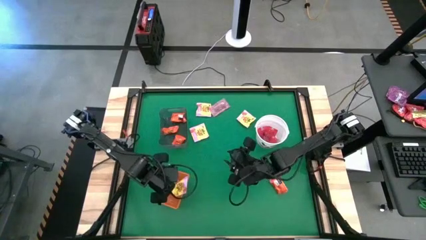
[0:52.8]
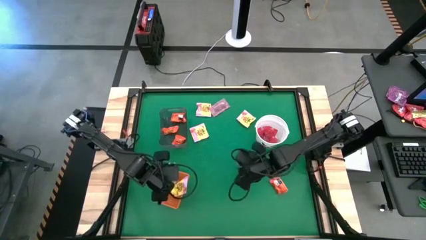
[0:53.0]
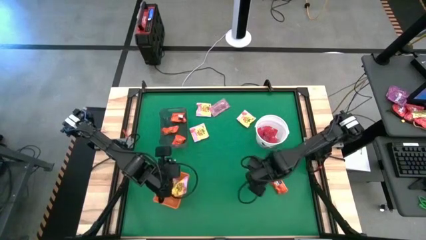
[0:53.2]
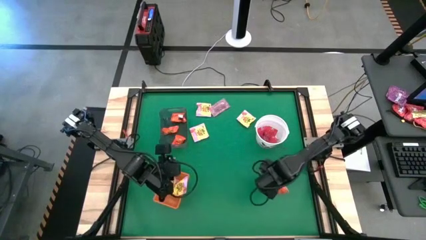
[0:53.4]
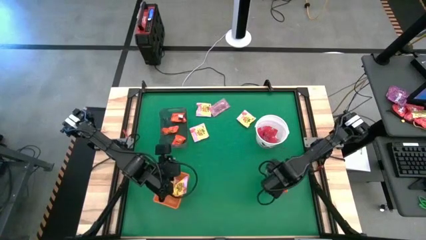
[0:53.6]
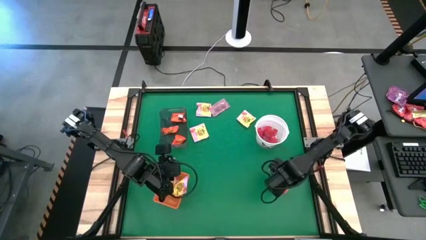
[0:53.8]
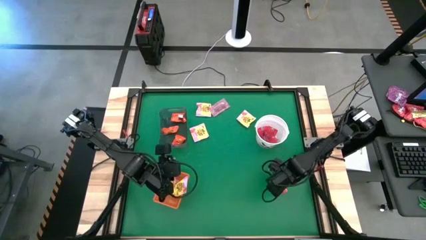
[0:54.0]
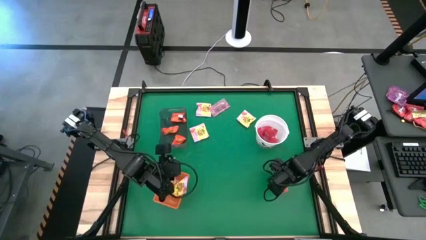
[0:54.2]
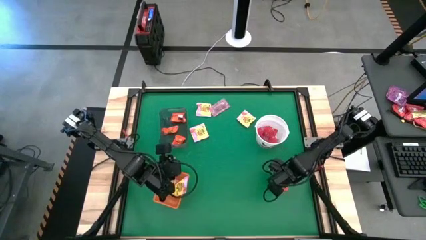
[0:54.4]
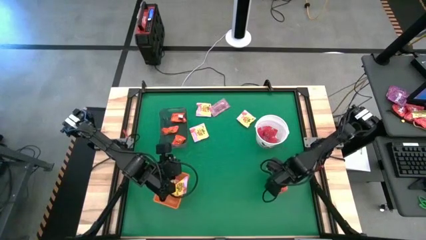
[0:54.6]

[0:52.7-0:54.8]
Task: Sort candy by brand, put in halloween buckets
Put the orange chocolate into the black bin

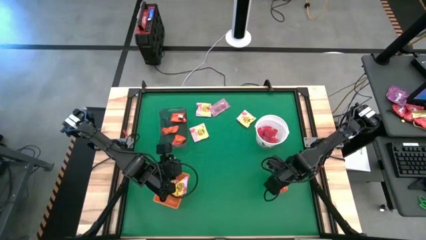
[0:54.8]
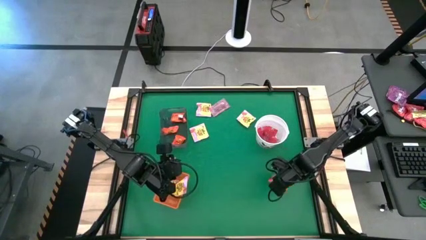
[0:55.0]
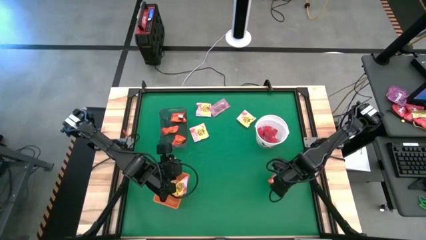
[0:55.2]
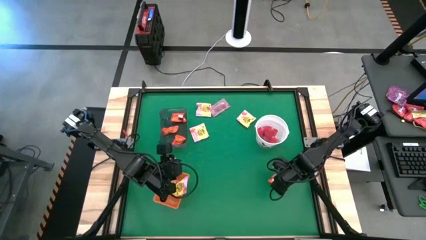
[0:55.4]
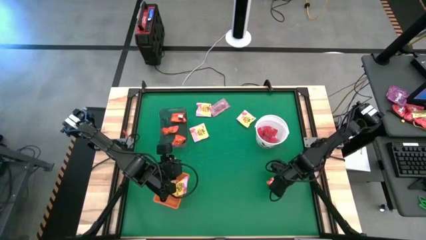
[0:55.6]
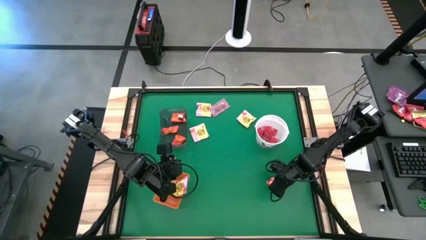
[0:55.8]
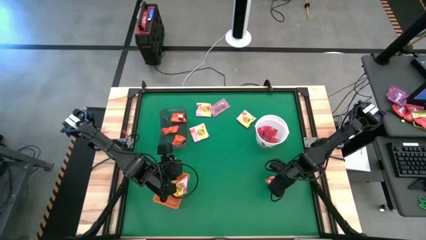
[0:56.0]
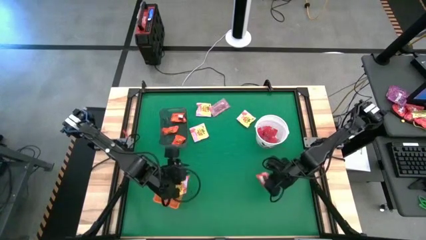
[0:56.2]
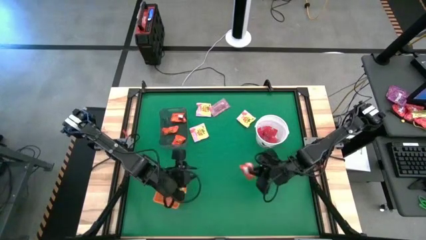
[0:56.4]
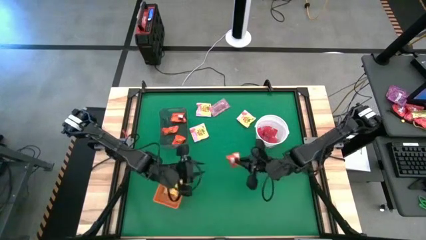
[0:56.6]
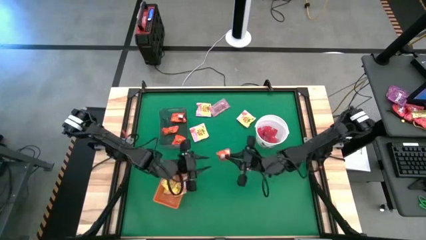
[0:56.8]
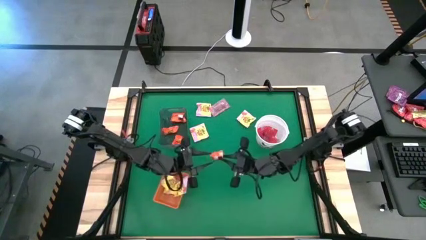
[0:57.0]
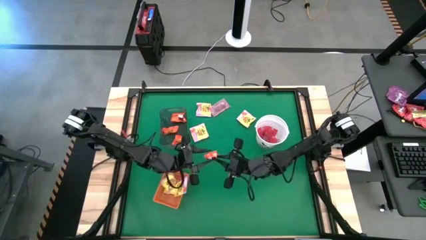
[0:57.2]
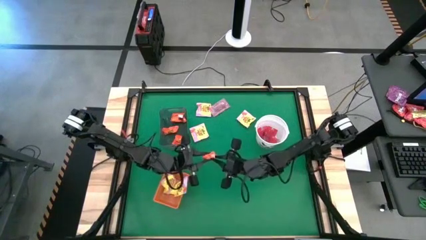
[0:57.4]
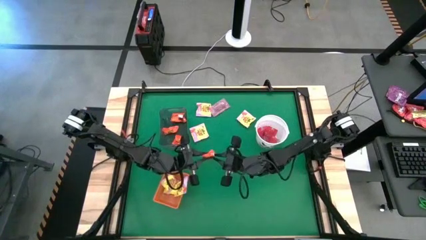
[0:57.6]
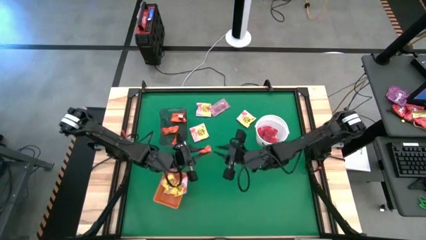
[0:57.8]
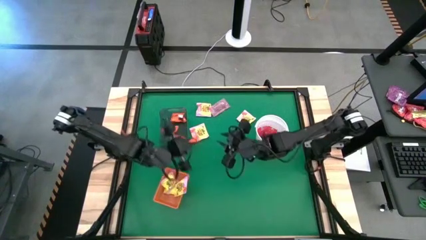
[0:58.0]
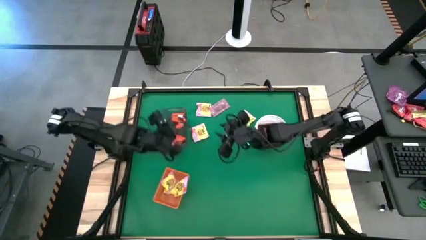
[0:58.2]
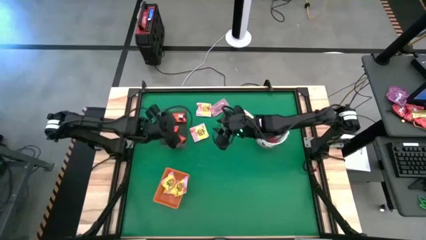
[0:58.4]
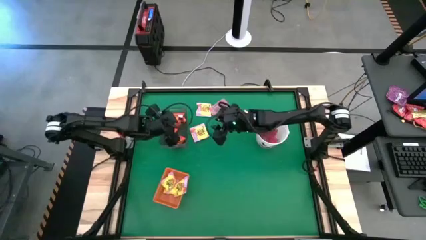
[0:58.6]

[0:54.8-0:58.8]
Put the orange chocolate into the black bin

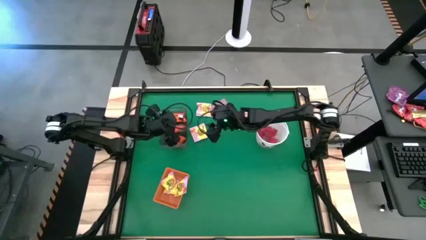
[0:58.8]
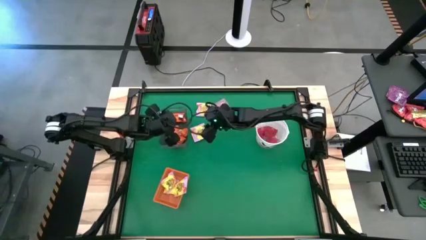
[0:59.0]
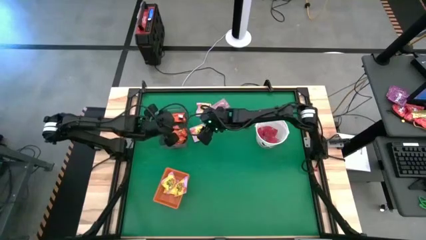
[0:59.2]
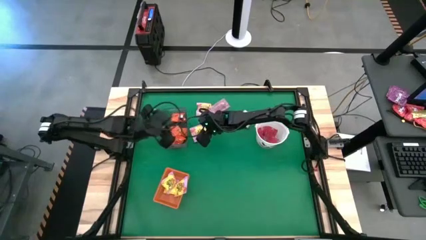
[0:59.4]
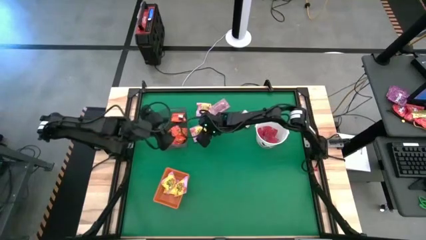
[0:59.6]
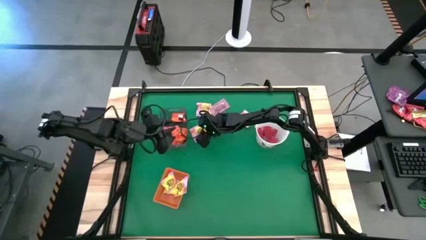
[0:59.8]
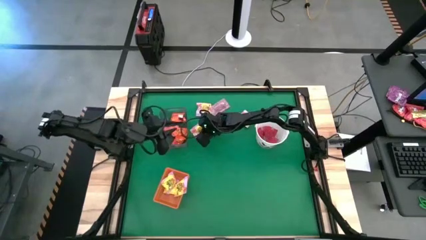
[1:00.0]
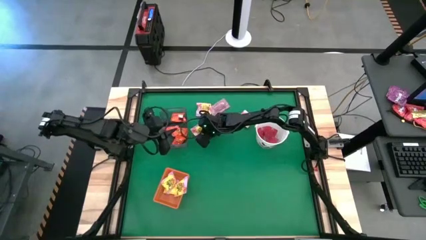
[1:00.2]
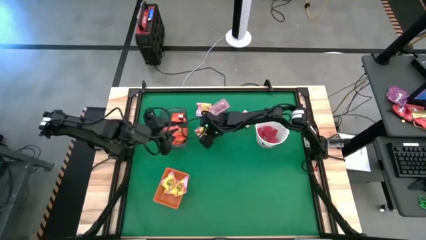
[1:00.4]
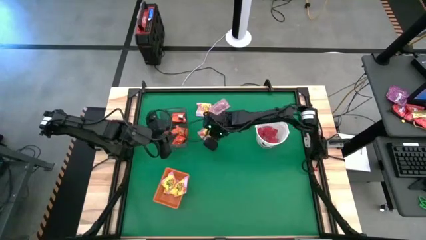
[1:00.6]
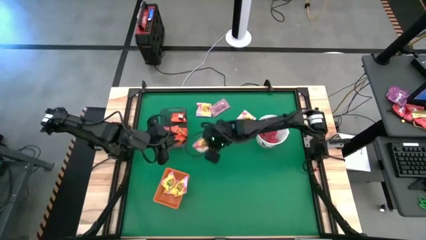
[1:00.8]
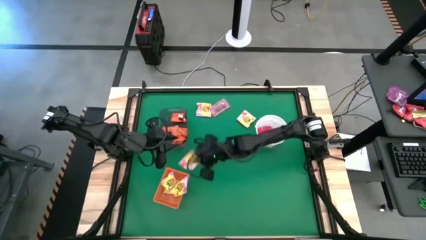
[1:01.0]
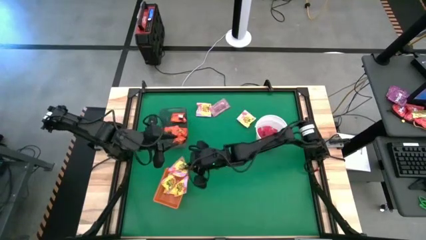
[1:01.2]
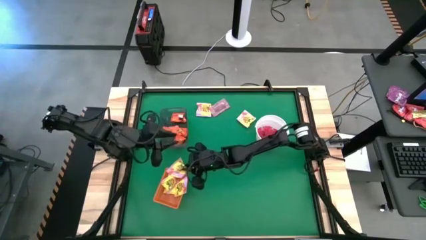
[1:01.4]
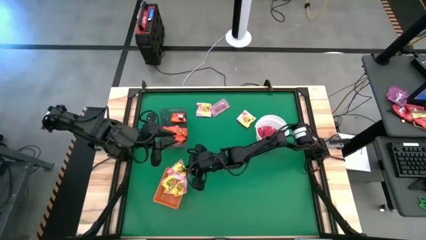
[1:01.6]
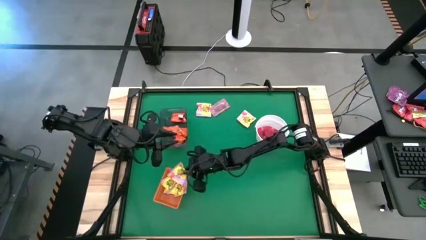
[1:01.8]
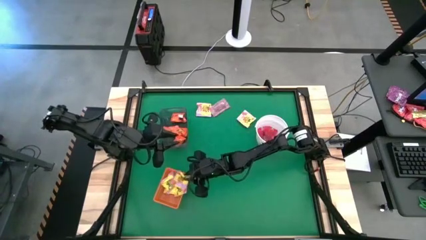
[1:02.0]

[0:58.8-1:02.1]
Put the yellow candy into the orange bin

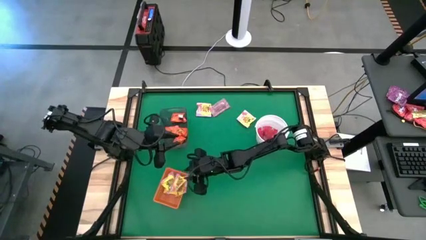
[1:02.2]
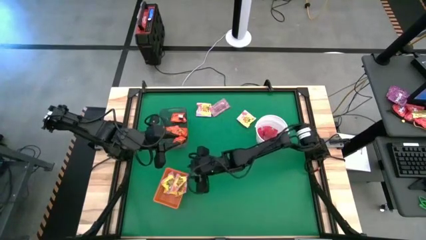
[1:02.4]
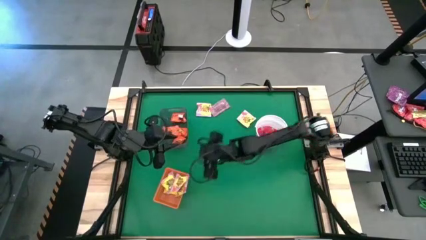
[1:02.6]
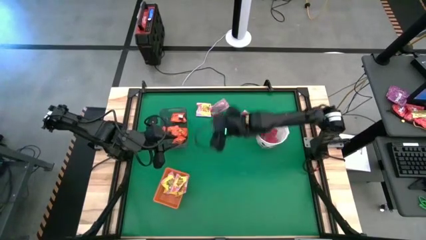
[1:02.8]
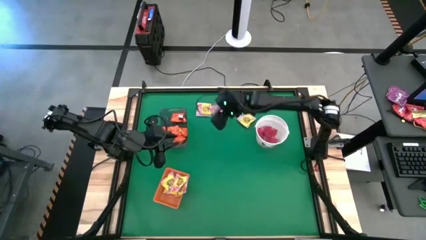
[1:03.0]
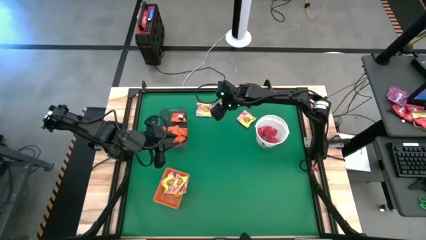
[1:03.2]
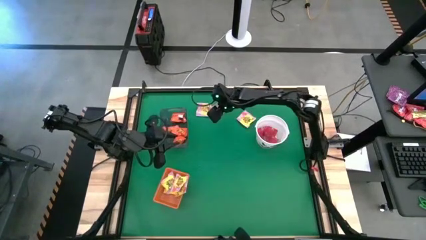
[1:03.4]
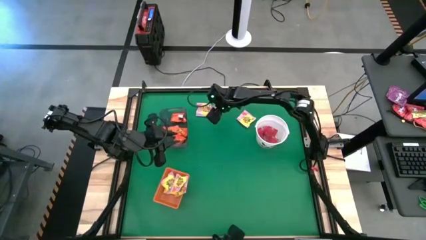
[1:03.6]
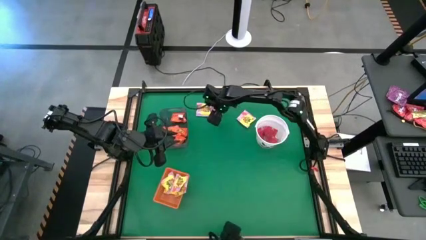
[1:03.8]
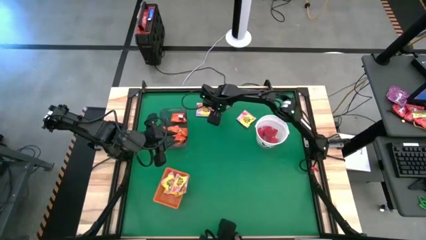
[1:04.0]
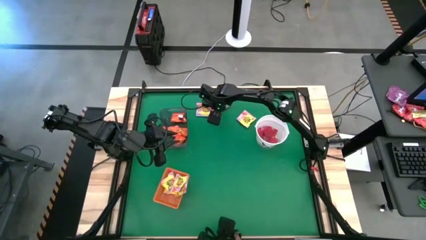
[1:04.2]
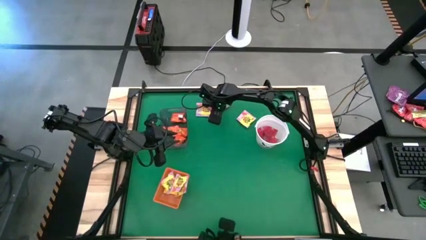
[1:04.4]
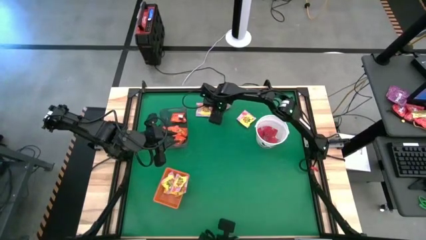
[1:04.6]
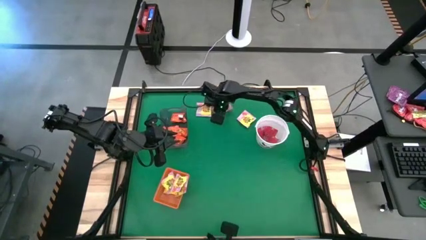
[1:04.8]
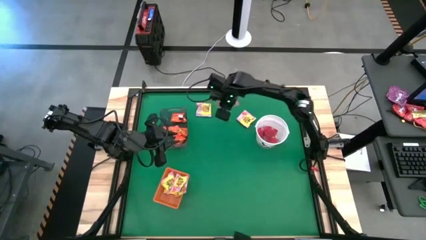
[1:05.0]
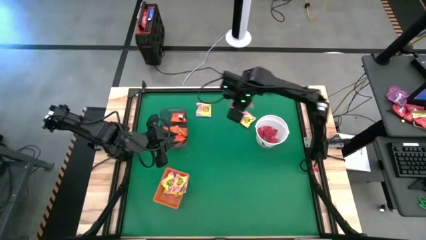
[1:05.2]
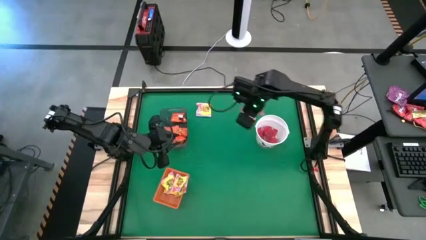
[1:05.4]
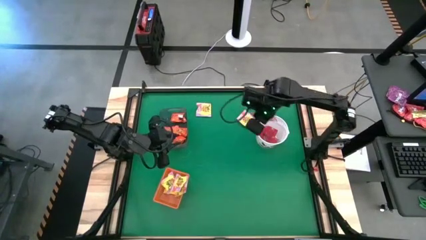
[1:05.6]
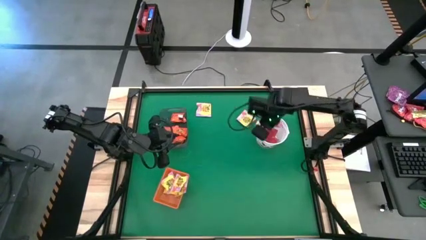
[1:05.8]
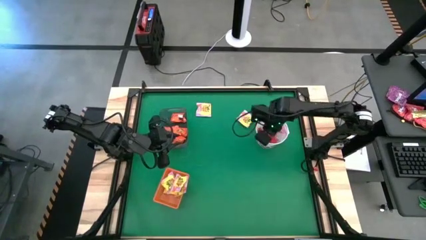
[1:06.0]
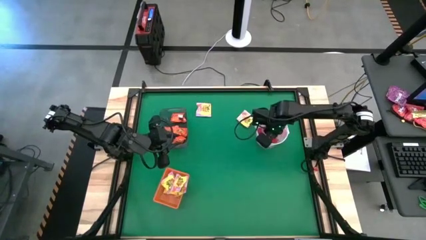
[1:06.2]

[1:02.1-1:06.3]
Put the red candy into the white bucket

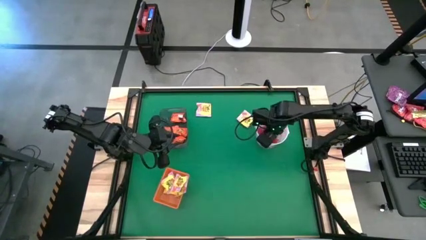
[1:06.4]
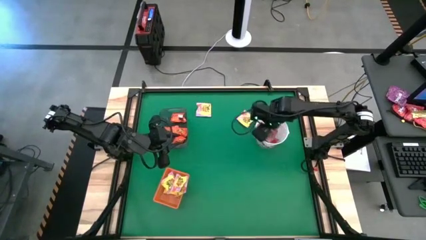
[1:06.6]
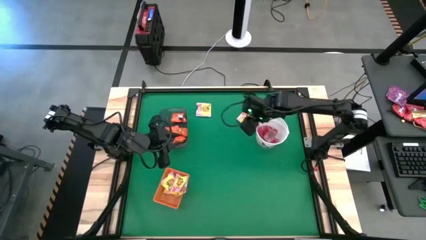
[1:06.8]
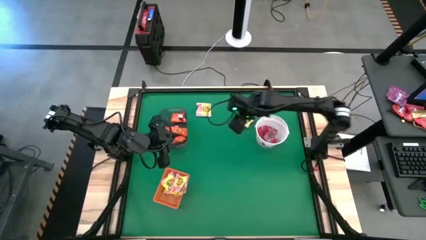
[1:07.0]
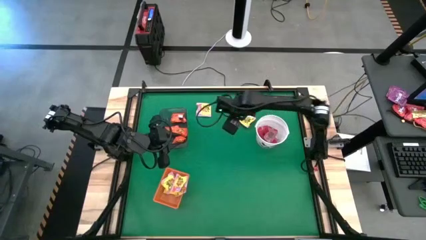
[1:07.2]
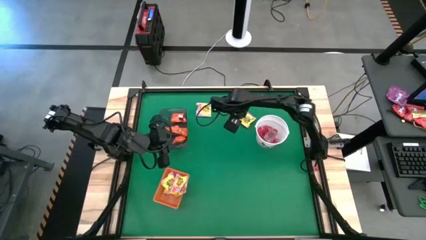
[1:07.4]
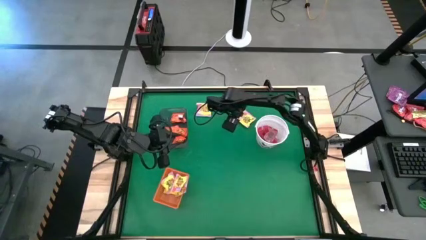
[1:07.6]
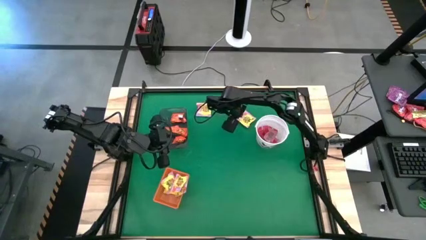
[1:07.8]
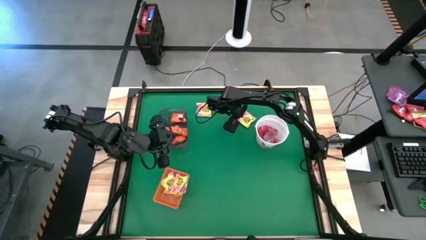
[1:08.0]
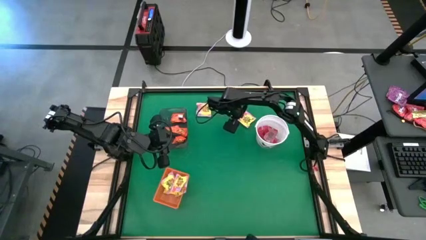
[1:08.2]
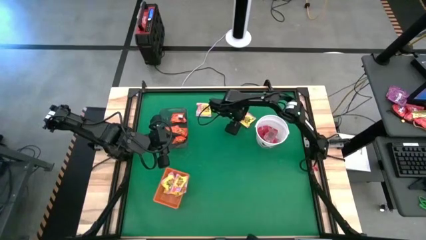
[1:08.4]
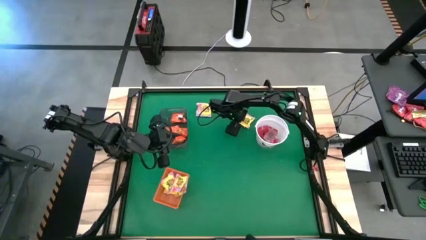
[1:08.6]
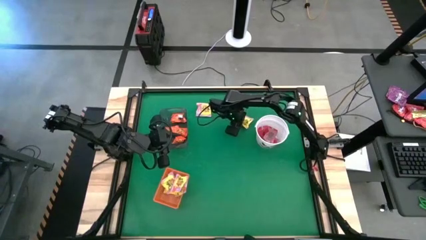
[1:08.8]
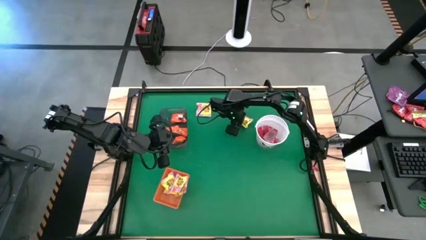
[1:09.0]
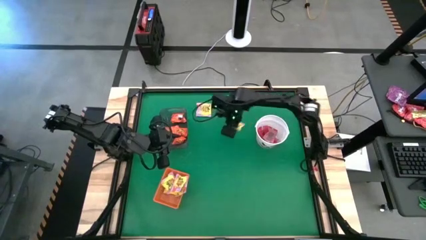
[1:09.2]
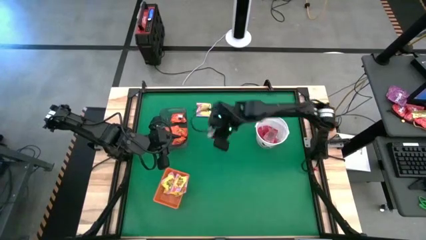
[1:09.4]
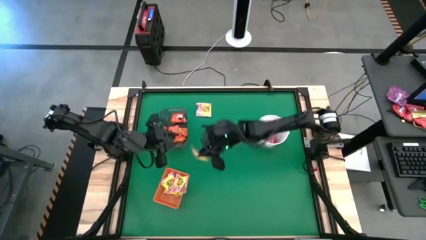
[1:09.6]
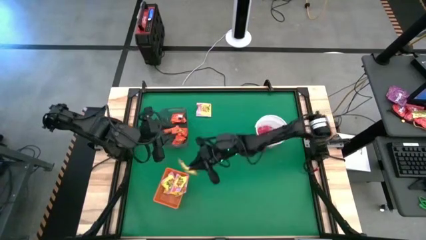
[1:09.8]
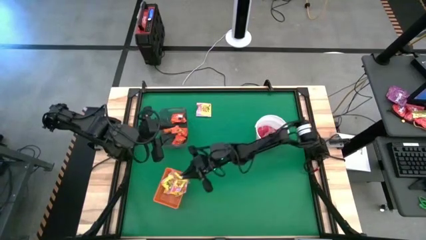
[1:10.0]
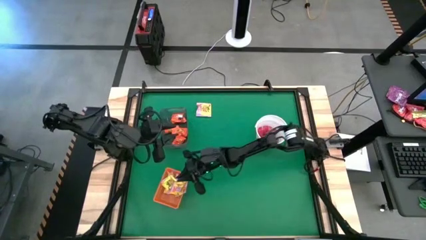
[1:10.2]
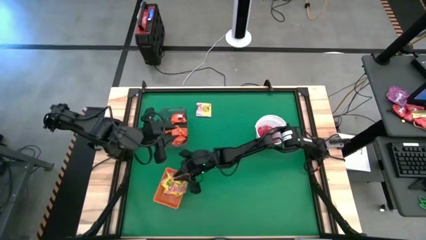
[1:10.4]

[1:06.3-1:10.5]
Put the yellow candy into the orange bin
